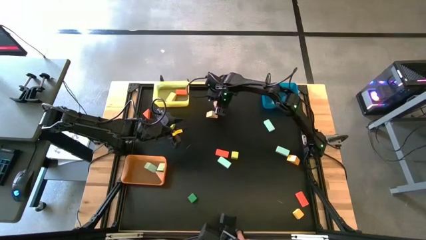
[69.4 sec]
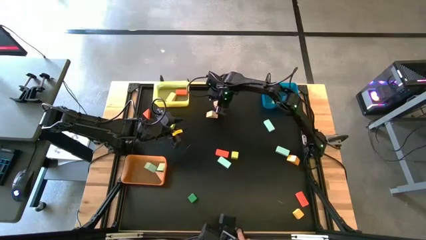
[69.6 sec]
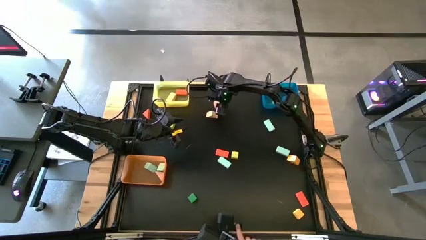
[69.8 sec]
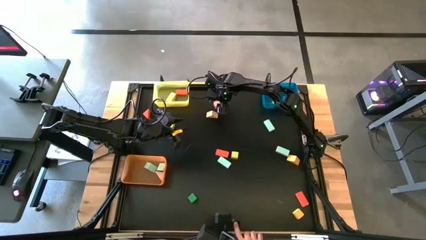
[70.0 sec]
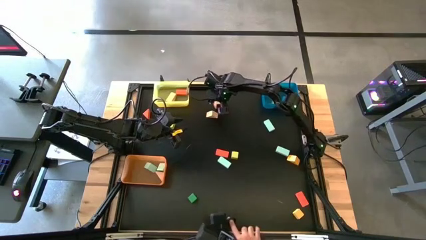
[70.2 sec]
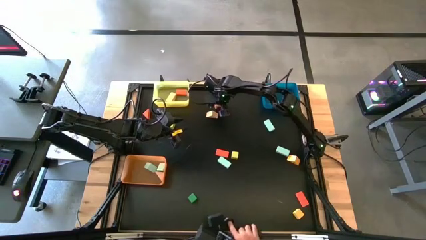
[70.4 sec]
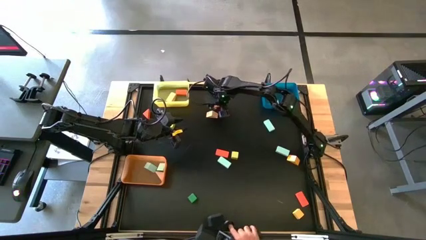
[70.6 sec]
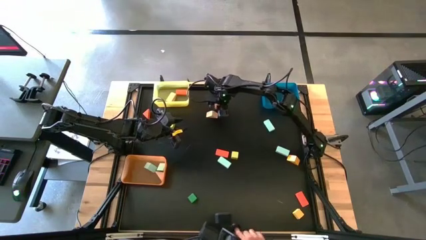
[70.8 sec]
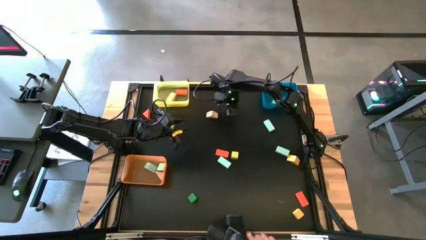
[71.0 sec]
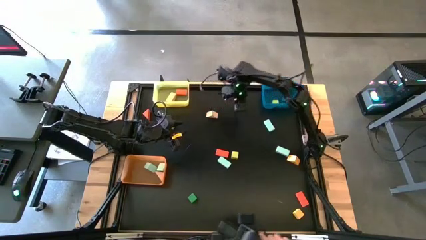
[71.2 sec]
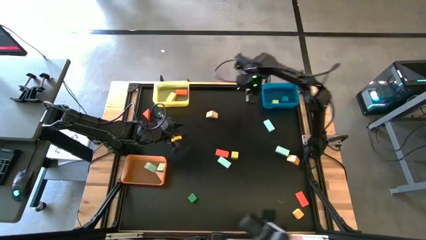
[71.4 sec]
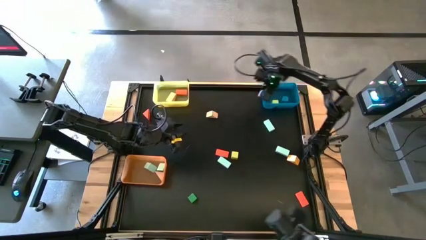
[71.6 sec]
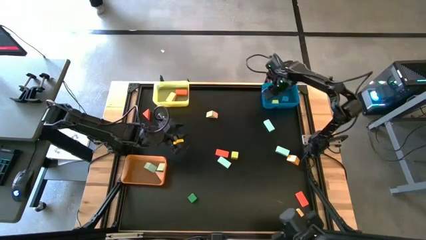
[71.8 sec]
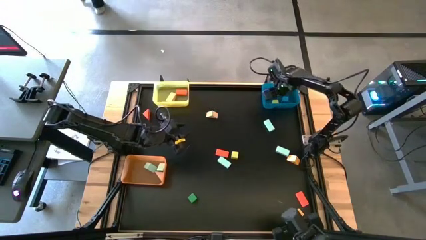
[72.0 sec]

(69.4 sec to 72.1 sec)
Task: Sort blocks by size
Put the brown wooden block into the blue bin

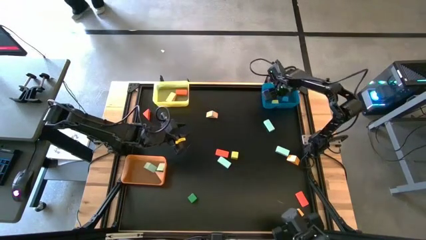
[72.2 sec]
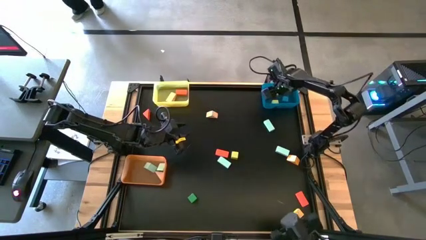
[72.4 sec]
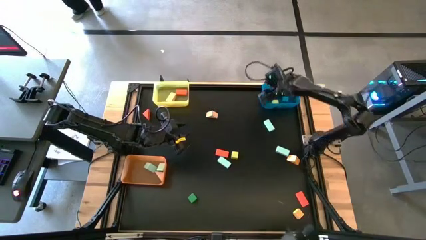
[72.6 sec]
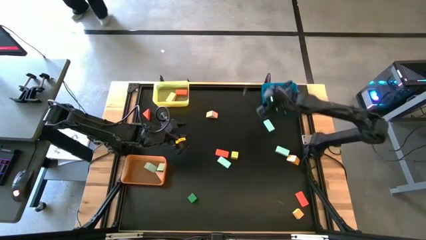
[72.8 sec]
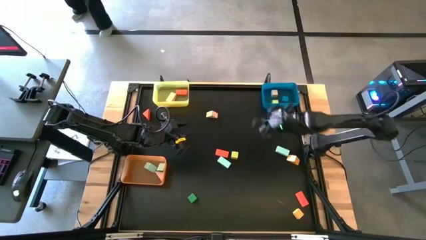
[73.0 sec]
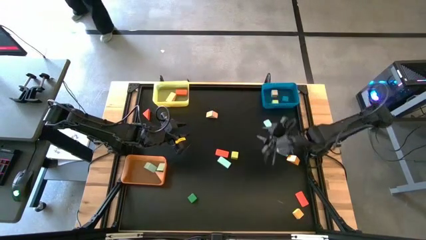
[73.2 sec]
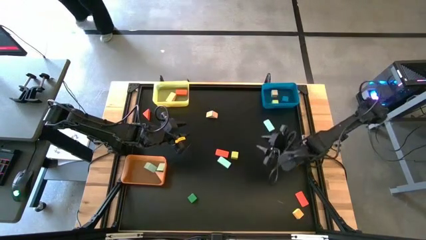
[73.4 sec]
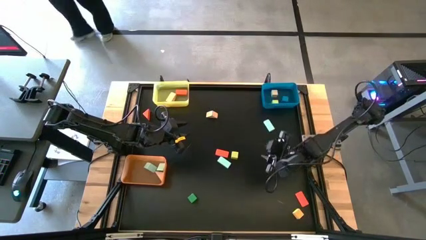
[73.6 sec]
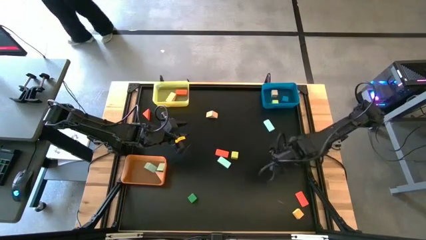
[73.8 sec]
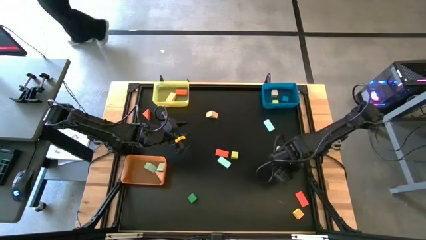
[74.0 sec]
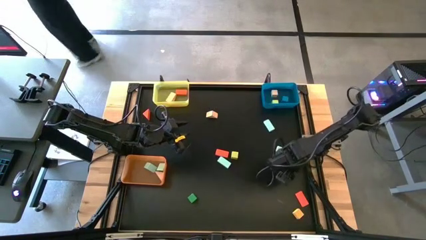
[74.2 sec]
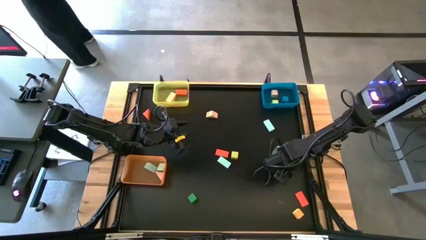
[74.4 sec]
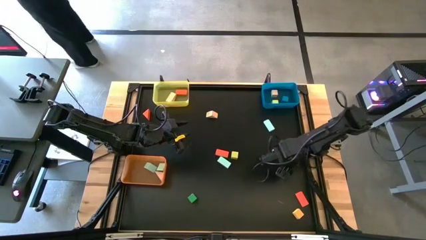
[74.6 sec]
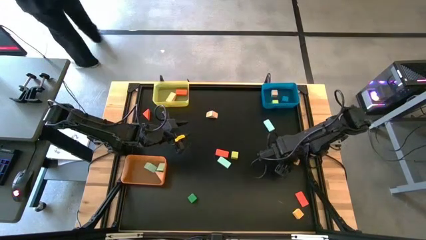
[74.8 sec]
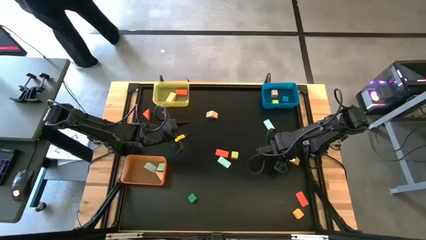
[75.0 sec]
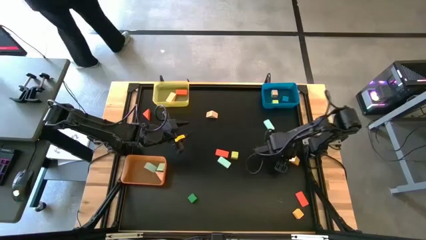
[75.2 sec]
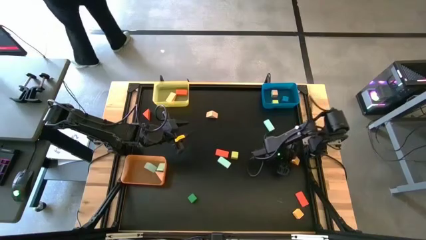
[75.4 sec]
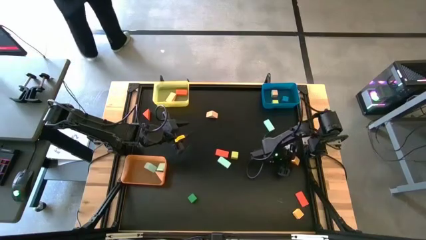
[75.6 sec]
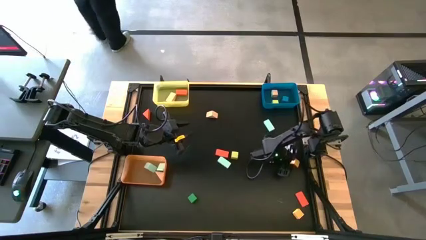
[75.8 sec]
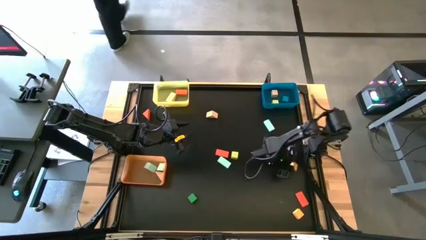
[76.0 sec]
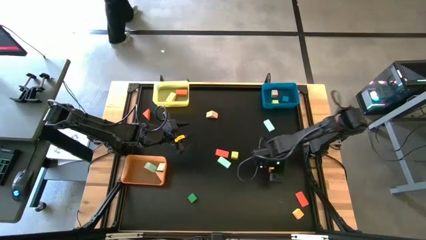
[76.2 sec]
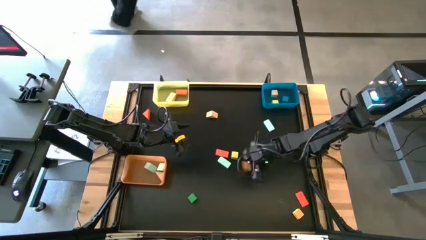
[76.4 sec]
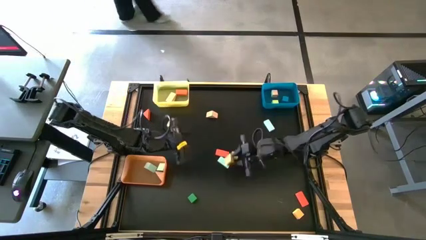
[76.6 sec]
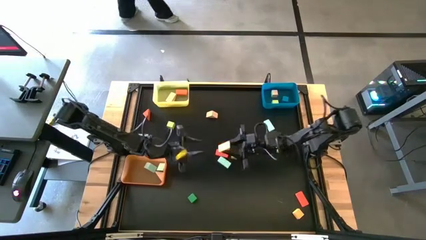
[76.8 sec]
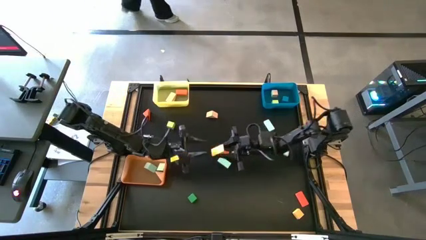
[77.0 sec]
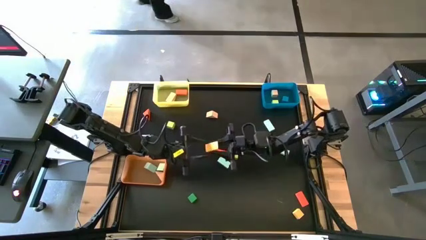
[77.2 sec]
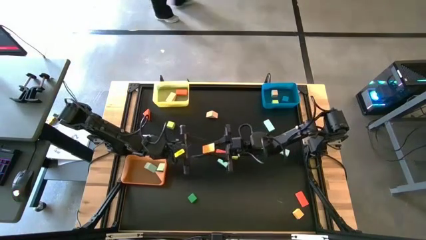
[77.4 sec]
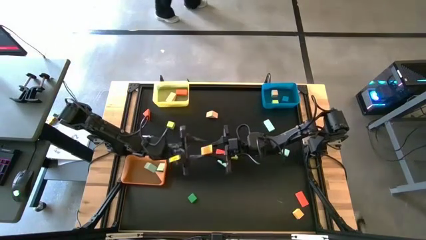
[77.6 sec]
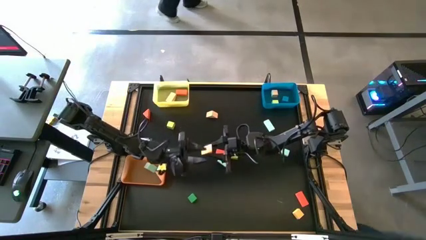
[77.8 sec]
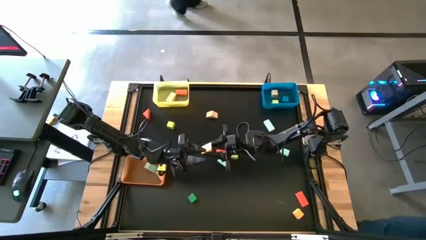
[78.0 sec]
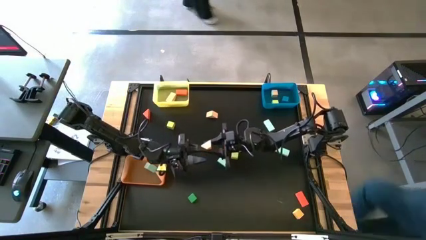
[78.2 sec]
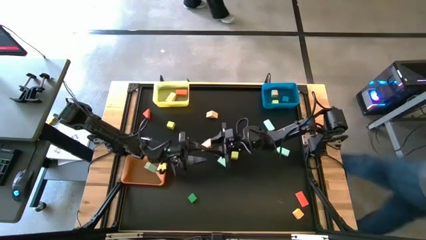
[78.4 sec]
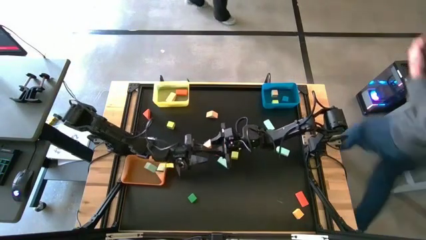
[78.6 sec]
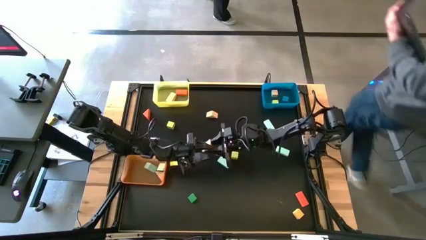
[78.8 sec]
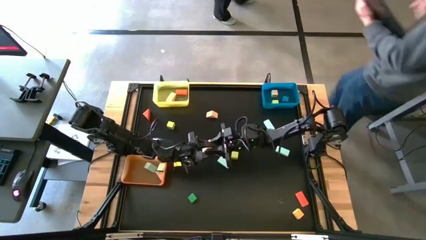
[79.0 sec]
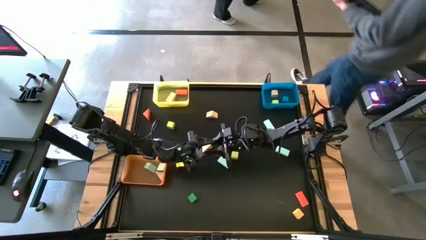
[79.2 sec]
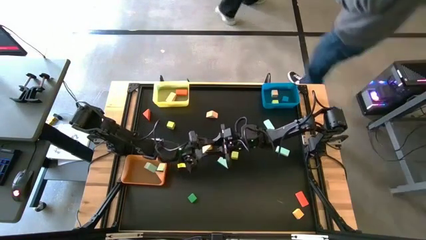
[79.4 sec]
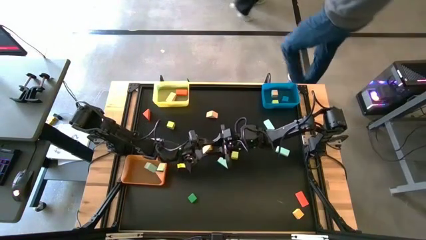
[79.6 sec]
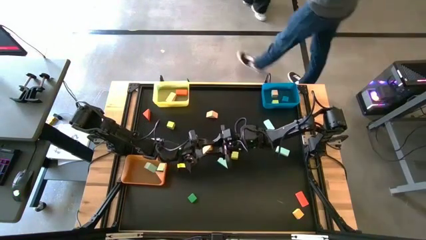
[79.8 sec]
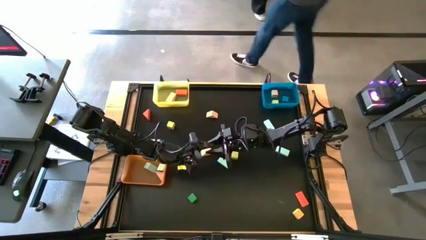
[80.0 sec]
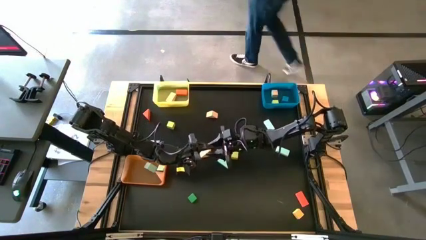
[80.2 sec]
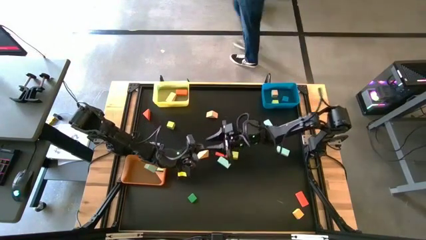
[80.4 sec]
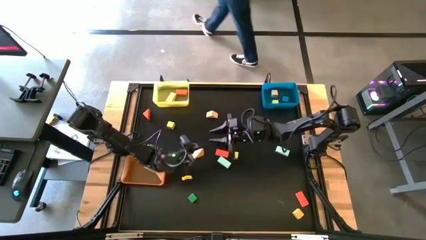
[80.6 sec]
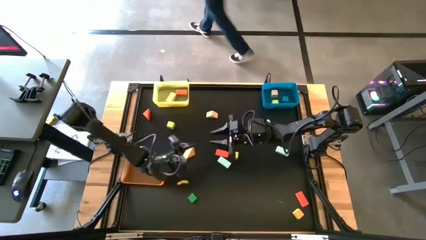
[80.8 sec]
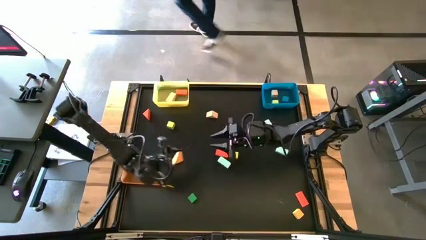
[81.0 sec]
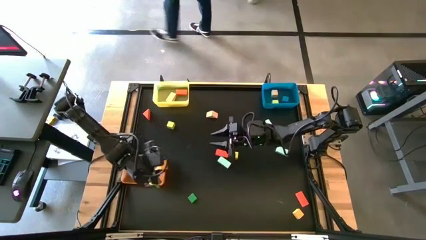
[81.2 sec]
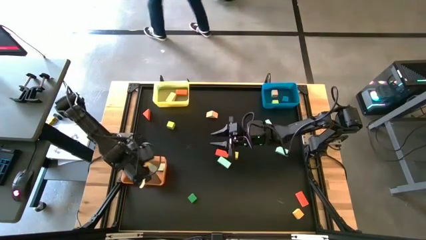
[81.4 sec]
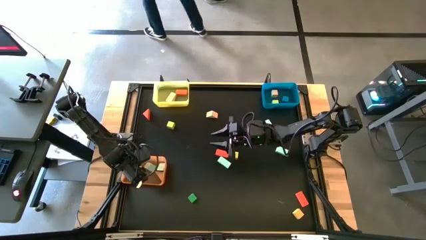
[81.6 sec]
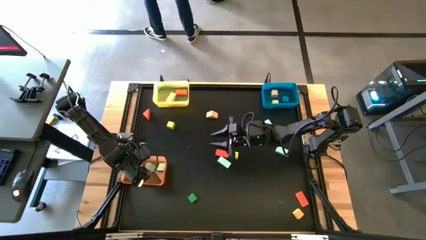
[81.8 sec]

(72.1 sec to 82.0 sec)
Put the yellow wooden block into the orange bin
